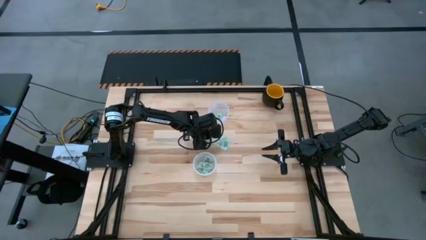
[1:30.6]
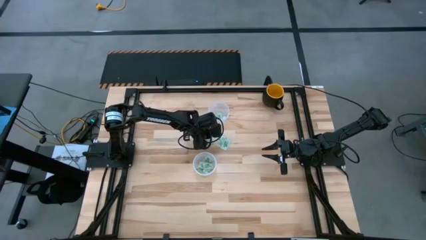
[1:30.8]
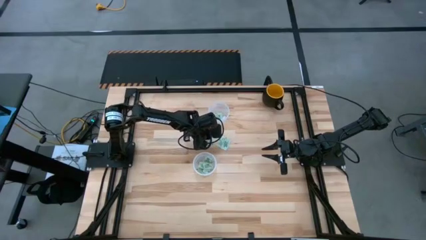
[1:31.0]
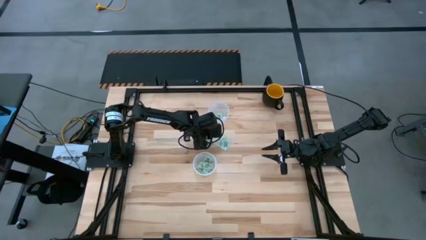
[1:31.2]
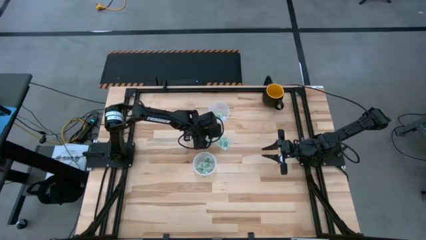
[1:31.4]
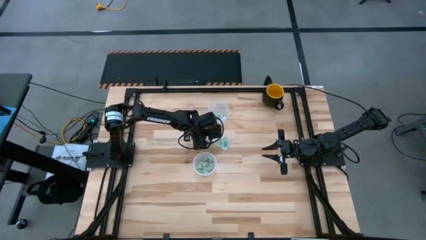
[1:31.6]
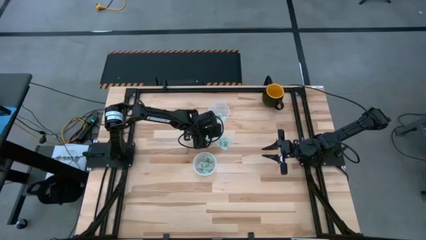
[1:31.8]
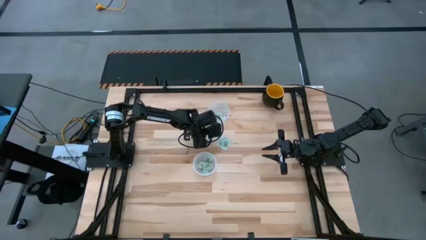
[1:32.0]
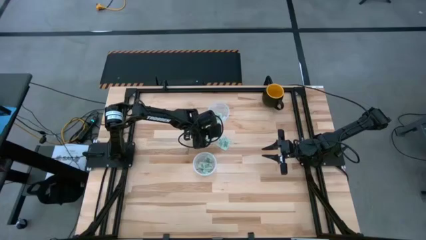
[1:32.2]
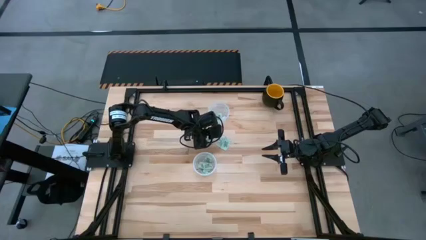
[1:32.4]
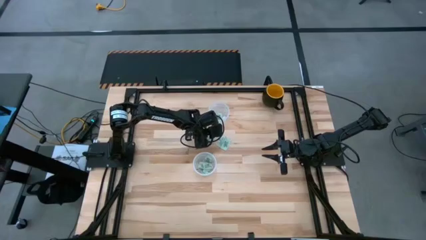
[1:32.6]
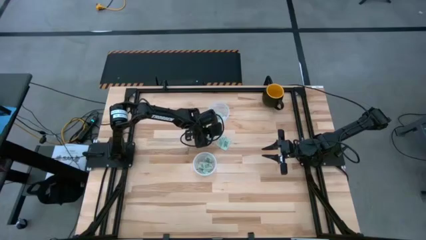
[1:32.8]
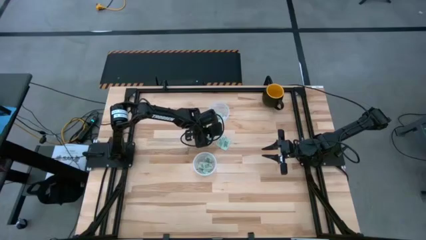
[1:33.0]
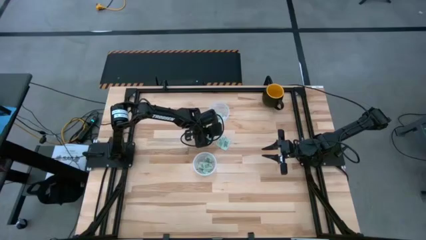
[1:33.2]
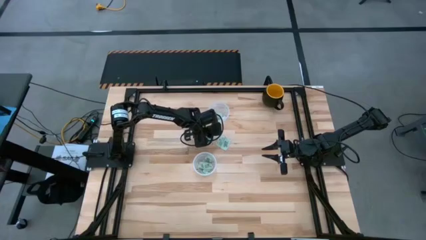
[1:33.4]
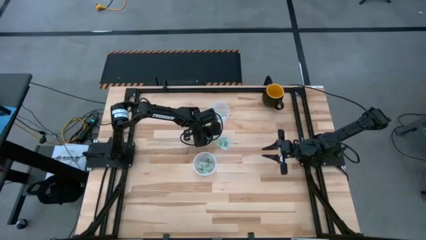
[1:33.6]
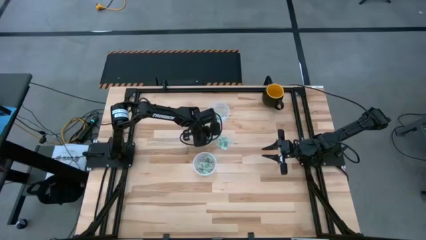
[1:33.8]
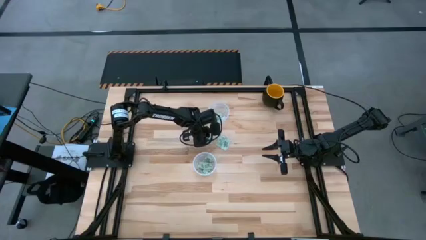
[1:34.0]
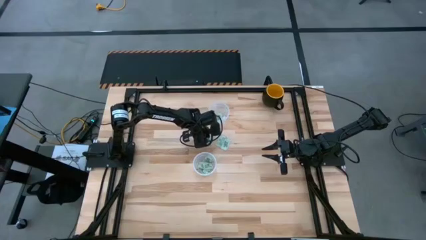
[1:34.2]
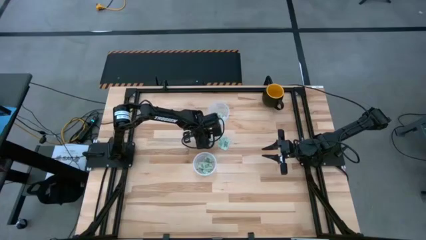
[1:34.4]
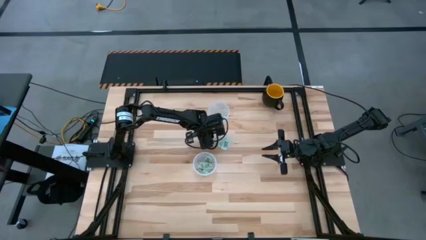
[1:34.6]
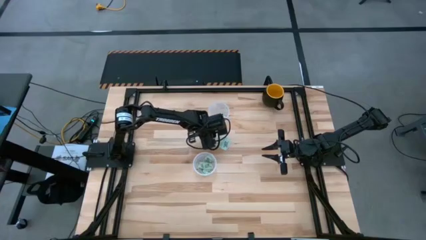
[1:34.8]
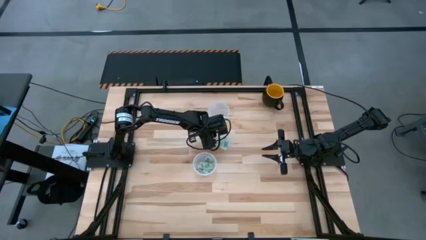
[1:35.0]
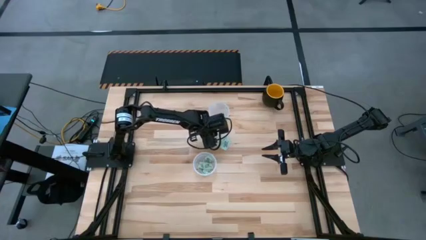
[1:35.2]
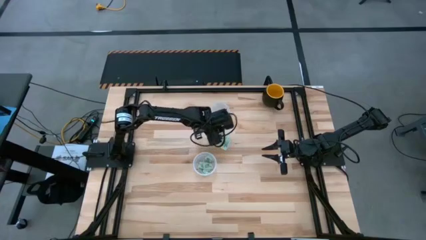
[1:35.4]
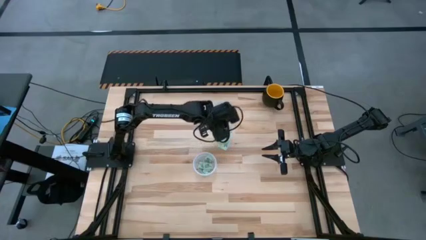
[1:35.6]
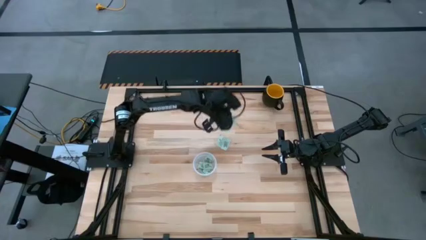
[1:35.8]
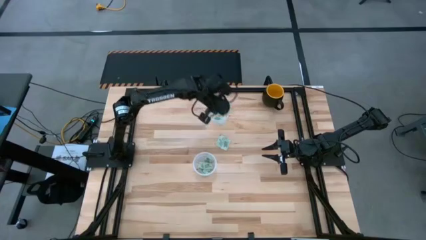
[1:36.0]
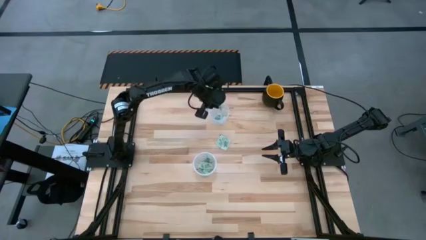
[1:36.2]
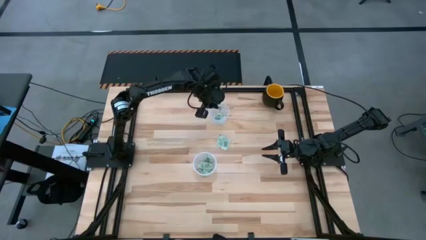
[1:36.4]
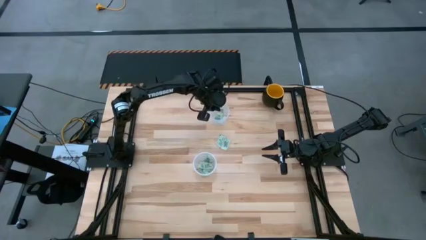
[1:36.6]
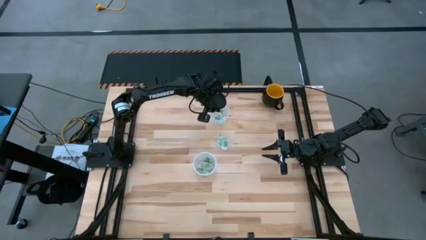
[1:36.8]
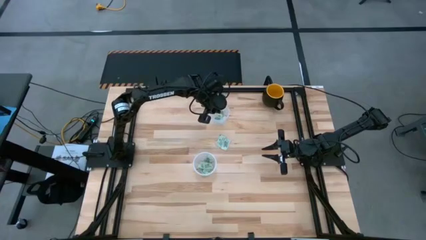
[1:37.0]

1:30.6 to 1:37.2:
Task: Pick and place items into bin
Put the top left stevia packet into the top bin

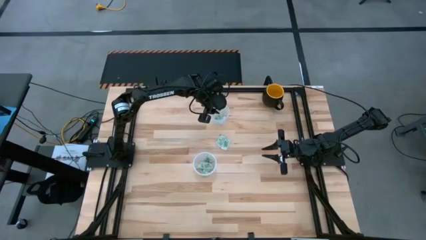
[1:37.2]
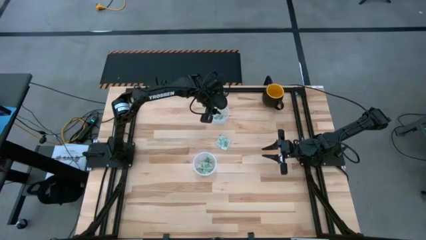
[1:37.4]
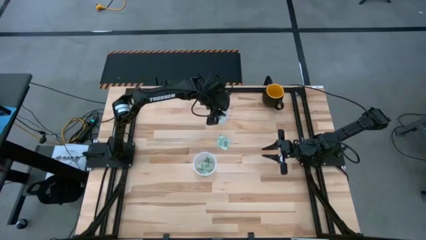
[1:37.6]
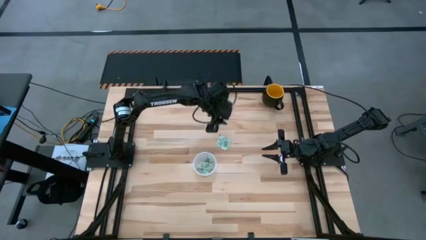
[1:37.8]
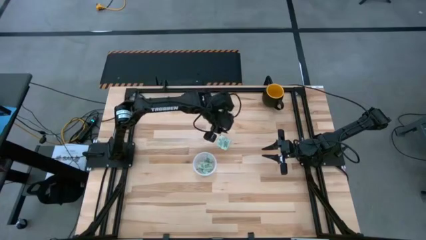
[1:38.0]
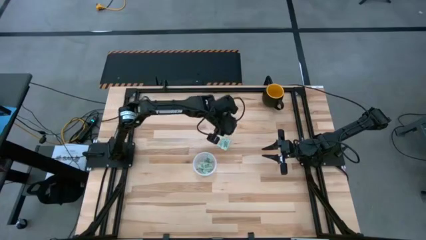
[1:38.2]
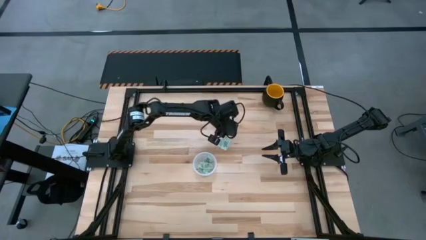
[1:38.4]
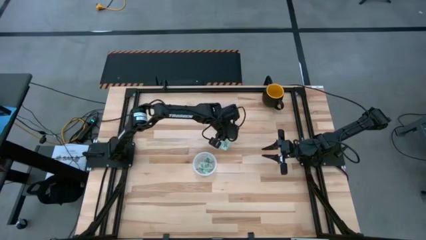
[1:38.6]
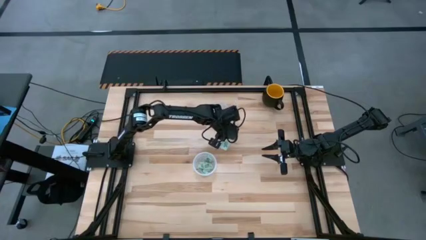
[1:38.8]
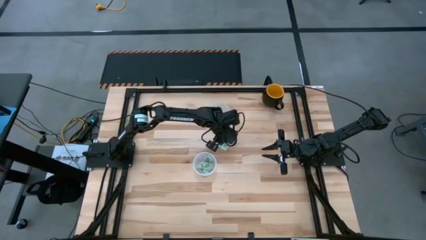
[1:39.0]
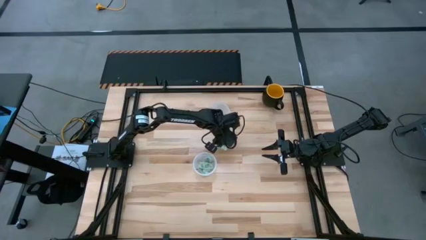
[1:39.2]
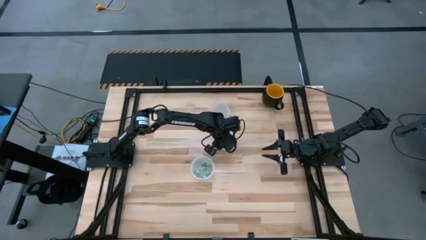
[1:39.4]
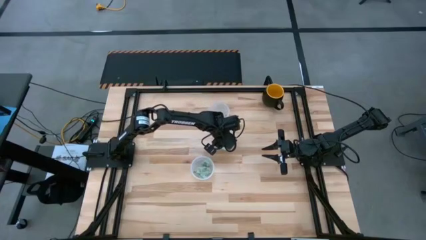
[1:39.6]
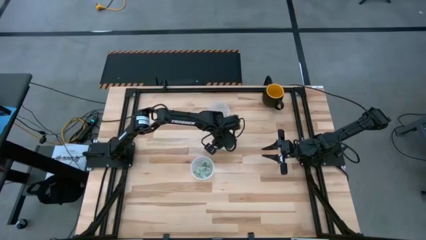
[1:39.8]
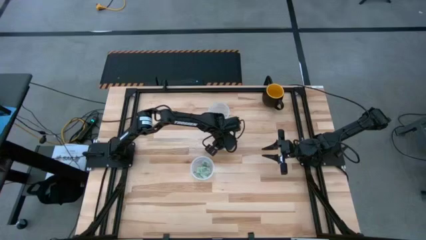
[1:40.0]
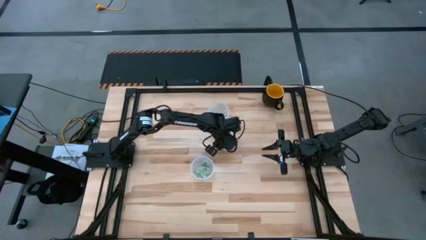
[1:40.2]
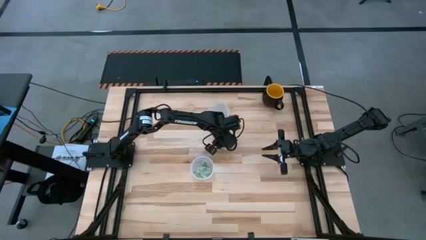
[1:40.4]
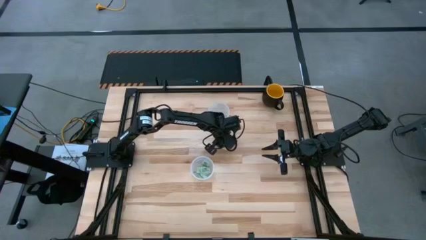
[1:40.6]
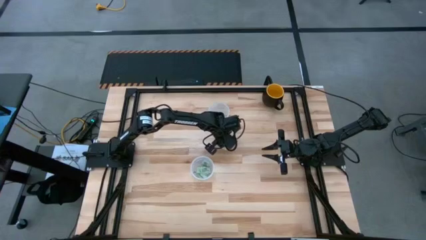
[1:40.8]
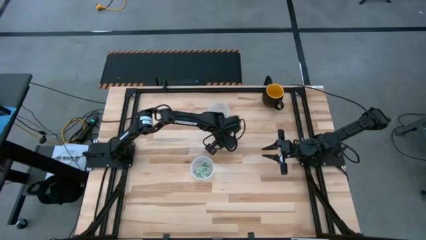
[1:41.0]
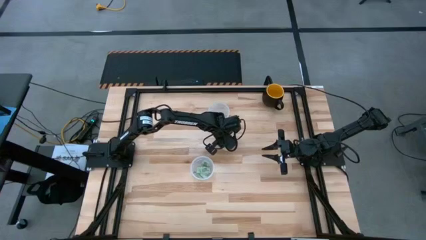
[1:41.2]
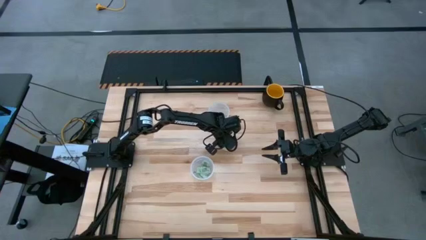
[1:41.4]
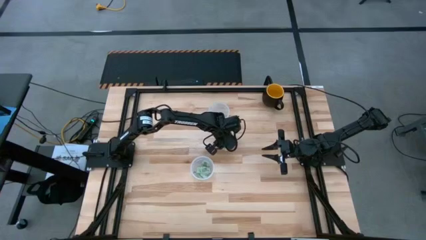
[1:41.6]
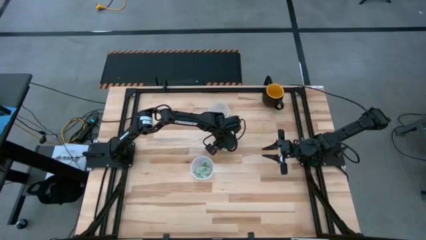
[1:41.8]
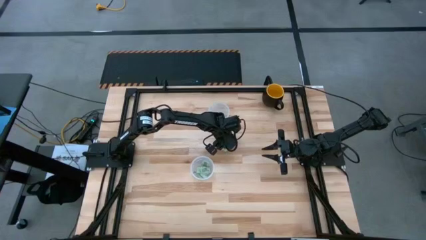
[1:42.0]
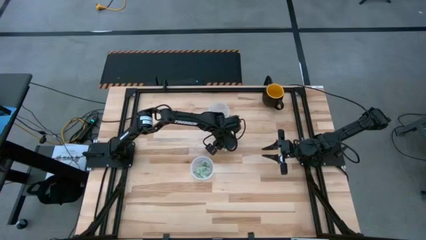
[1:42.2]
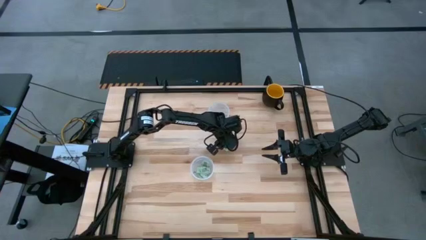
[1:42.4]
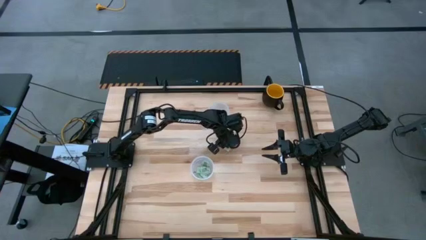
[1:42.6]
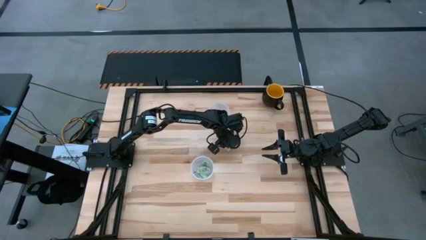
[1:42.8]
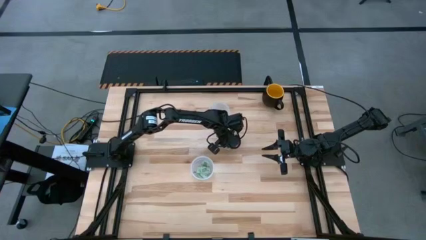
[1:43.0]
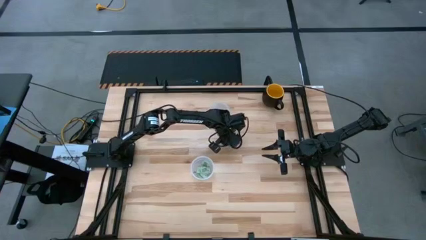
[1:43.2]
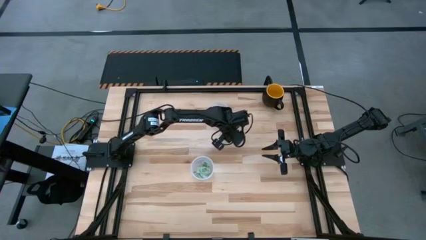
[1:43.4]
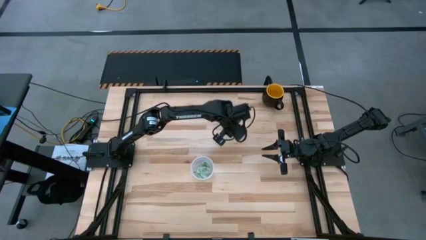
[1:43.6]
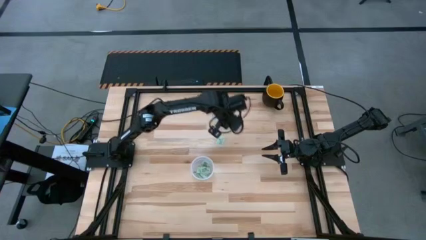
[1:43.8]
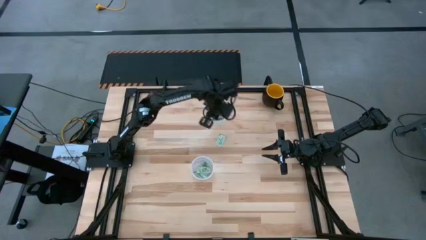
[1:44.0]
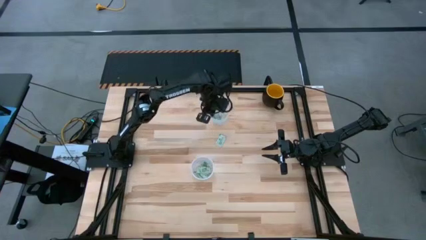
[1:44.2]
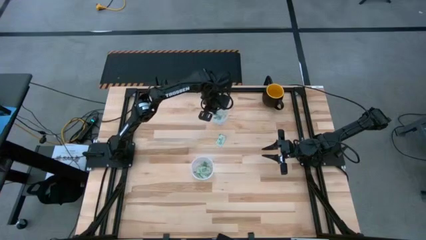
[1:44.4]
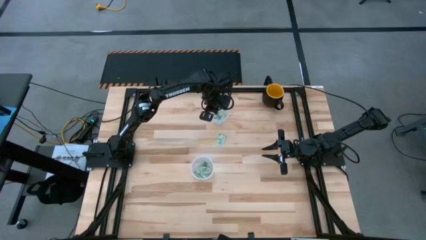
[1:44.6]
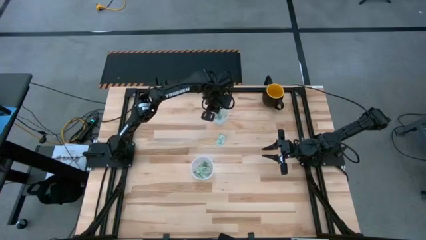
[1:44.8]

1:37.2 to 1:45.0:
Put the top left stevia packet into the top bin

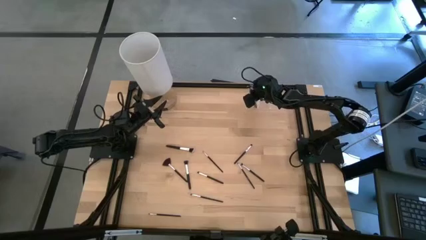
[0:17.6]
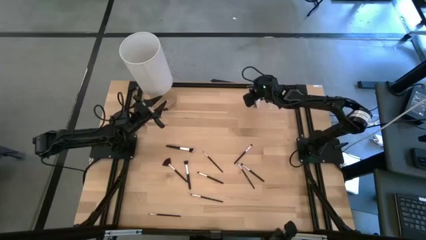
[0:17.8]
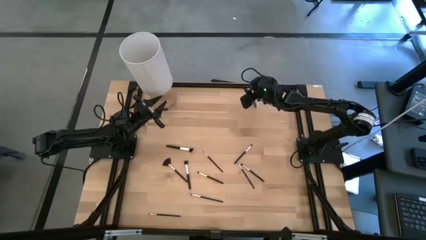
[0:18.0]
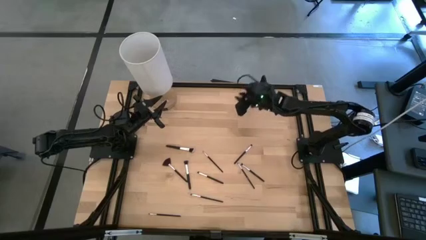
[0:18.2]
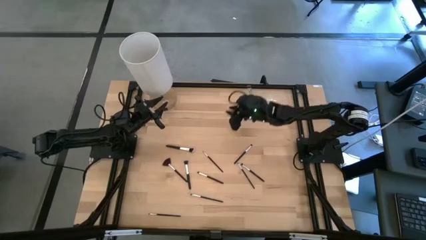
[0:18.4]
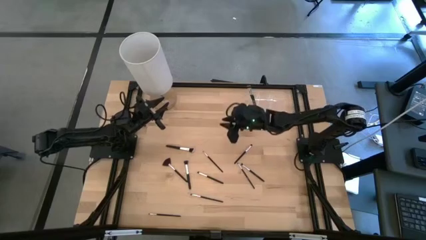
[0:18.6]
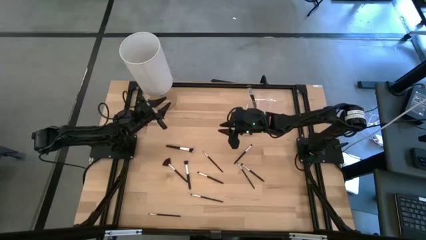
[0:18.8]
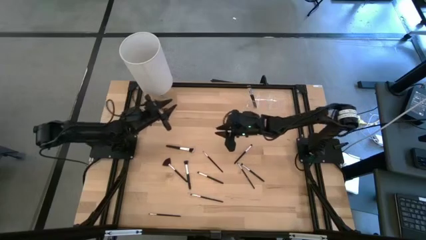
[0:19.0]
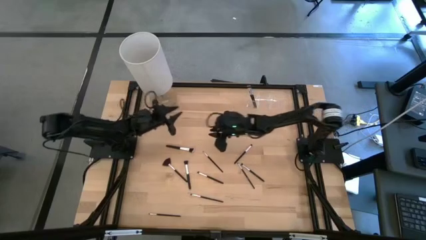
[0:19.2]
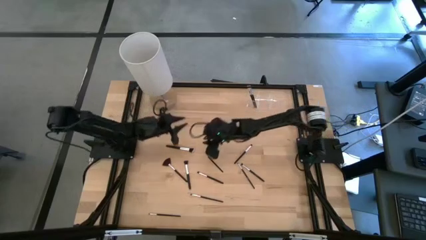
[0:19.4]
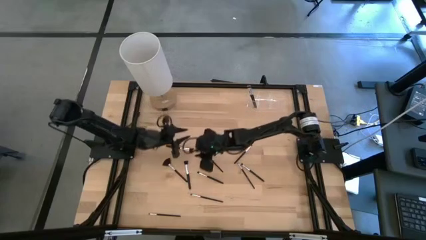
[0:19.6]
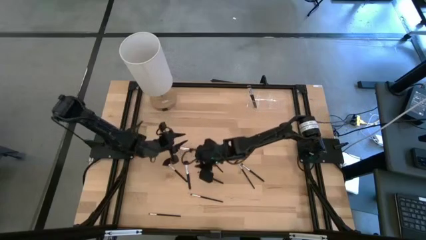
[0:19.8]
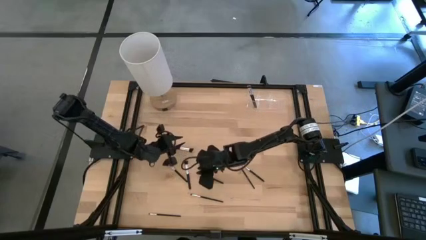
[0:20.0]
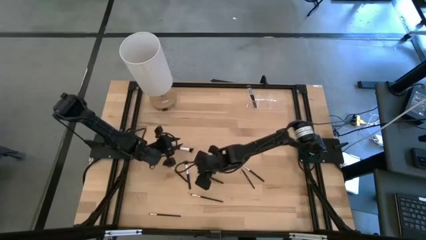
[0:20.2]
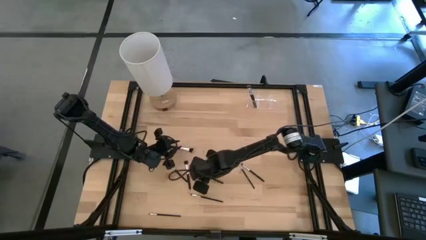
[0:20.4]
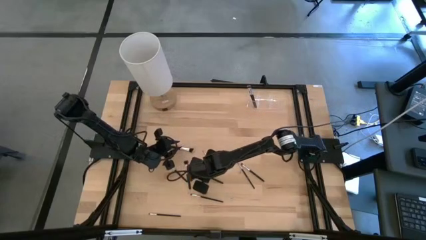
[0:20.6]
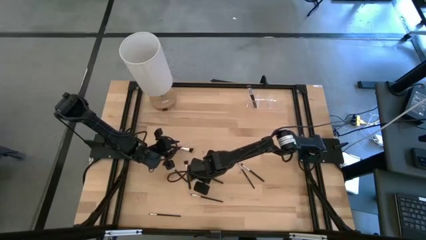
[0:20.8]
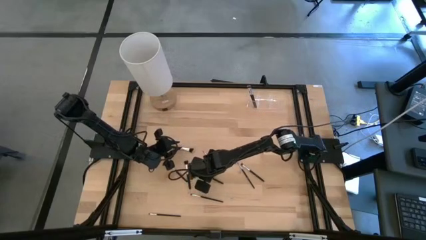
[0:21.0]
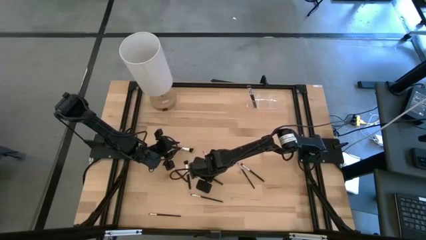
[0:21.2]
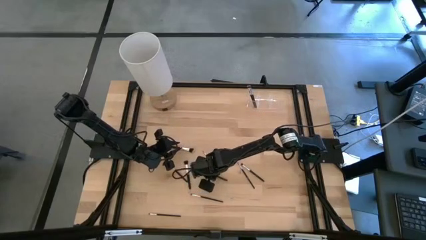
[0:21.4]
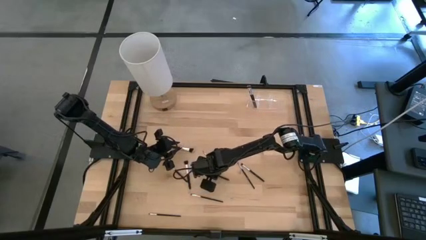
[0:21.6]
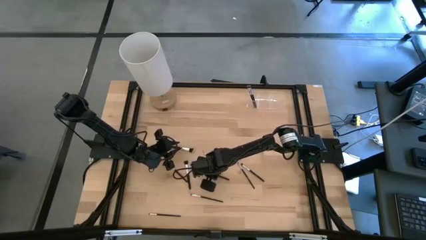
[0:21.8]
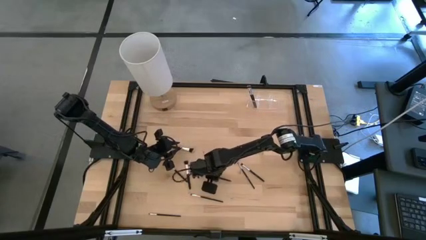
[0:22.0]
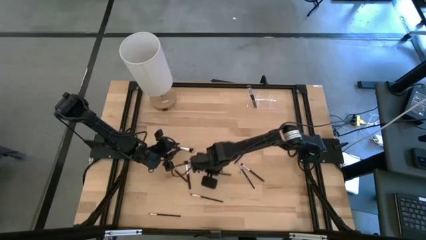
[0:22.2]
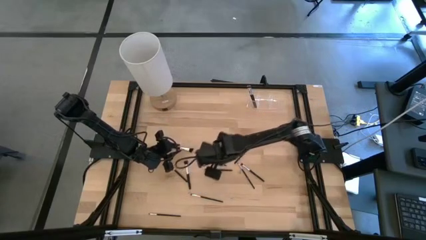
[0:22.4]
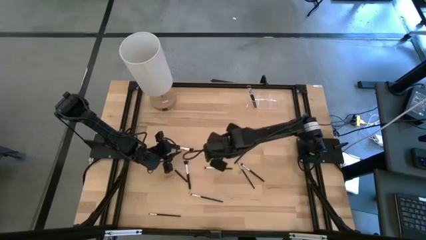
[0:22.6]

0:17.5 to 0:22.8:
Task: Put items in baskets/containers
Put the eyeshadow brush into the left side of the transparent organizer
